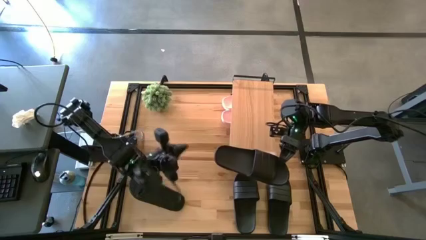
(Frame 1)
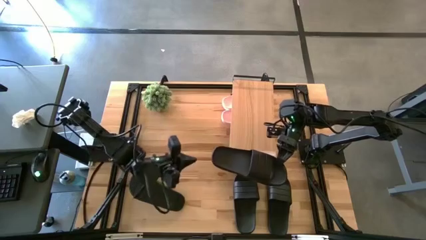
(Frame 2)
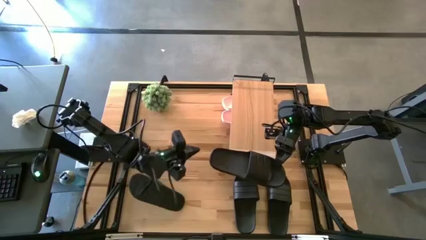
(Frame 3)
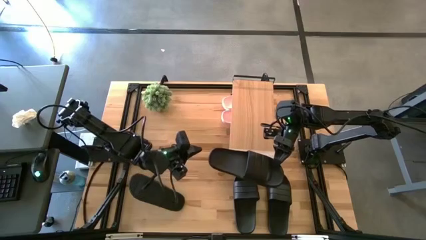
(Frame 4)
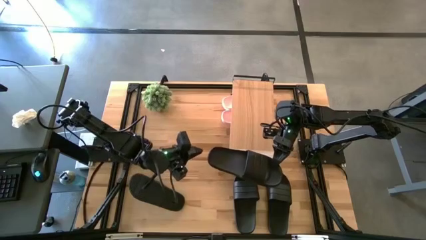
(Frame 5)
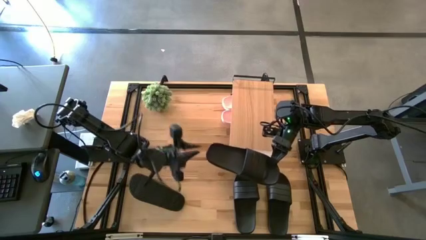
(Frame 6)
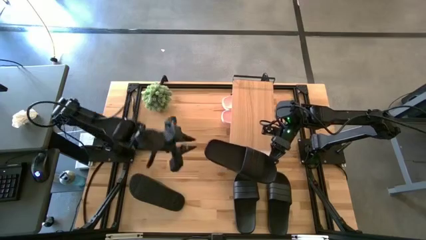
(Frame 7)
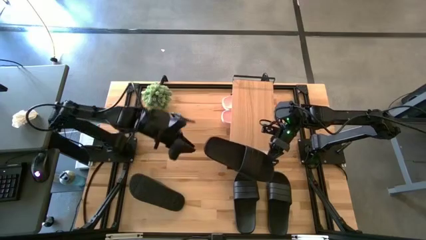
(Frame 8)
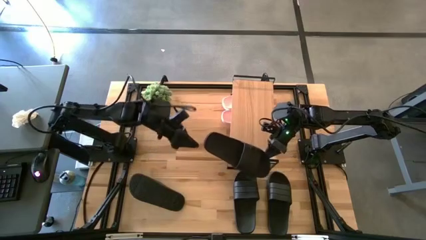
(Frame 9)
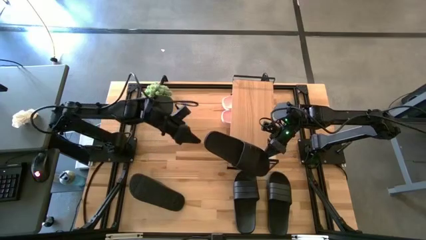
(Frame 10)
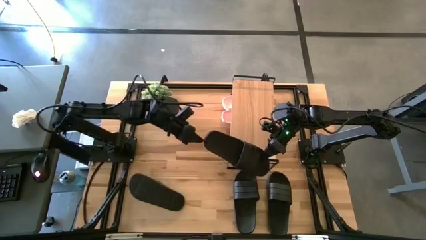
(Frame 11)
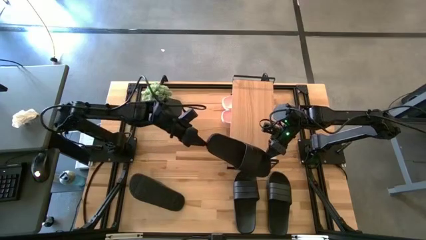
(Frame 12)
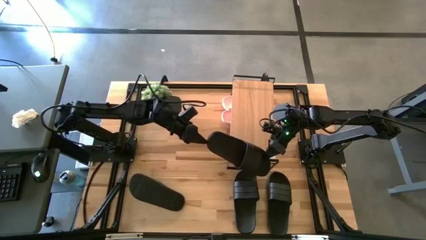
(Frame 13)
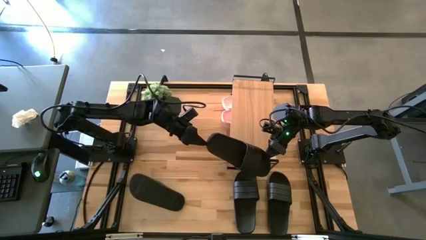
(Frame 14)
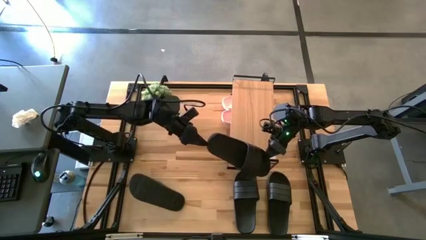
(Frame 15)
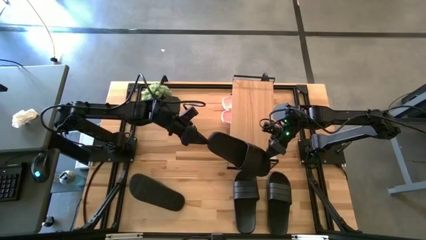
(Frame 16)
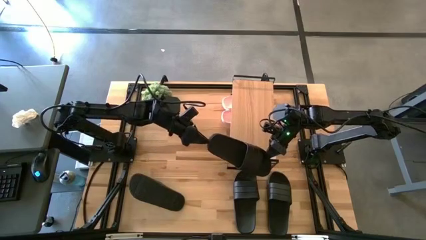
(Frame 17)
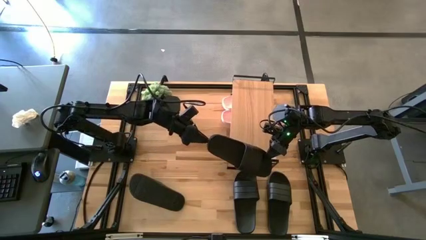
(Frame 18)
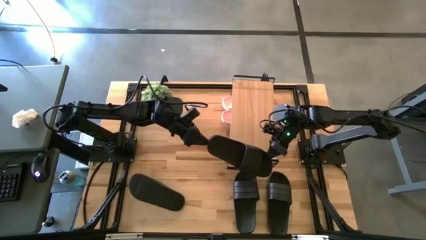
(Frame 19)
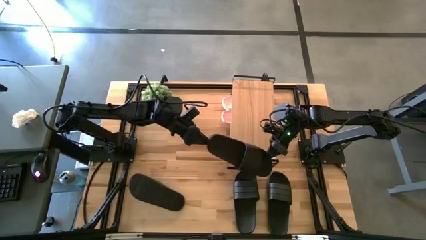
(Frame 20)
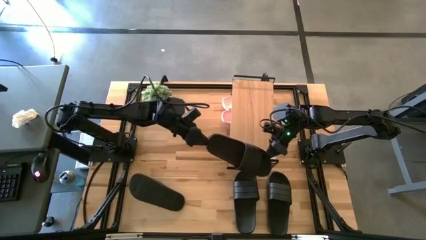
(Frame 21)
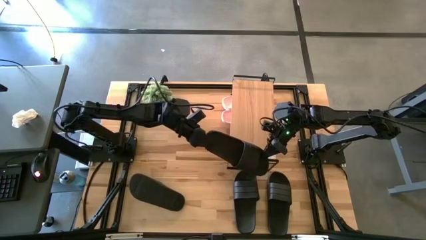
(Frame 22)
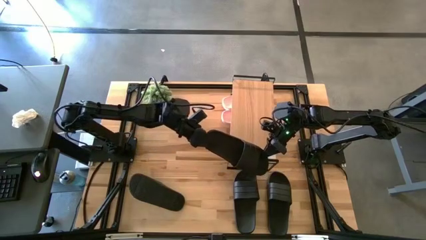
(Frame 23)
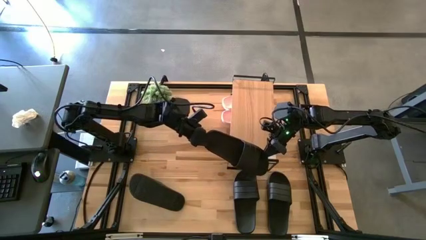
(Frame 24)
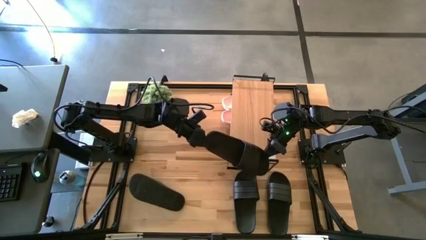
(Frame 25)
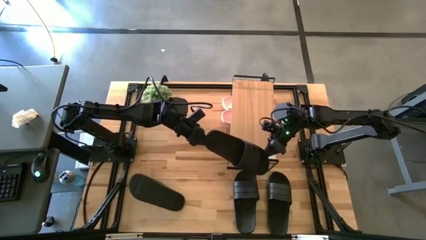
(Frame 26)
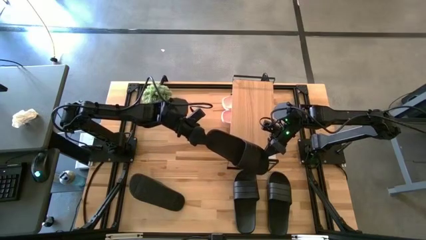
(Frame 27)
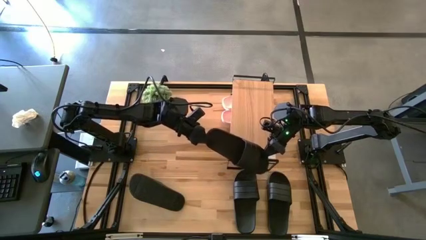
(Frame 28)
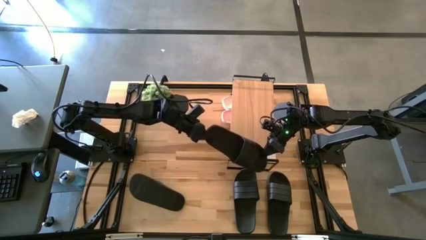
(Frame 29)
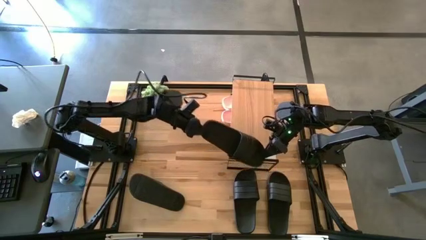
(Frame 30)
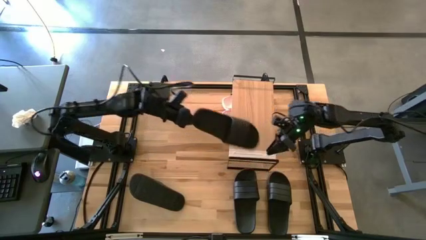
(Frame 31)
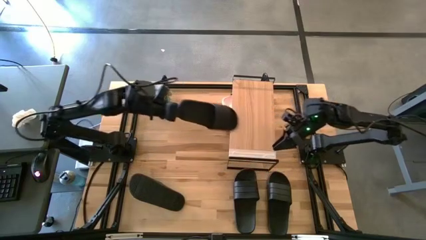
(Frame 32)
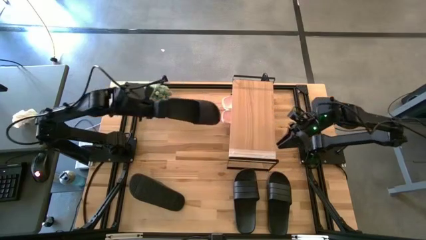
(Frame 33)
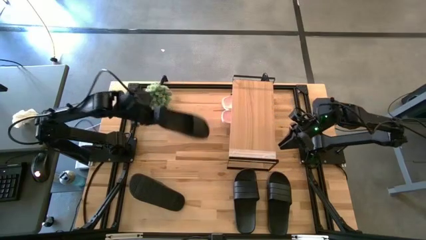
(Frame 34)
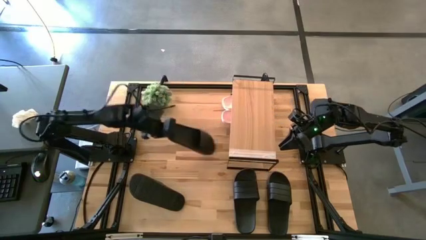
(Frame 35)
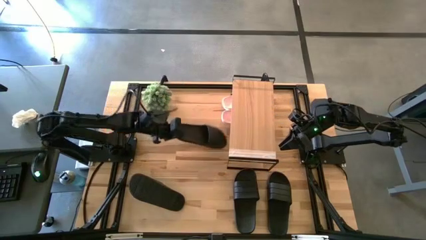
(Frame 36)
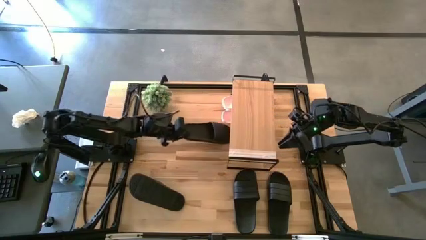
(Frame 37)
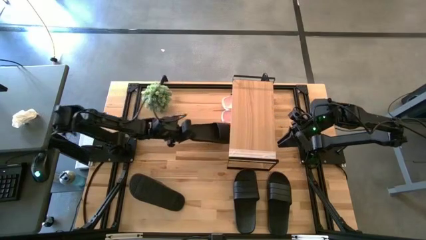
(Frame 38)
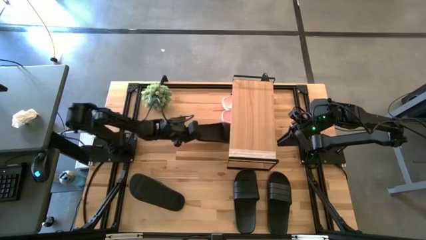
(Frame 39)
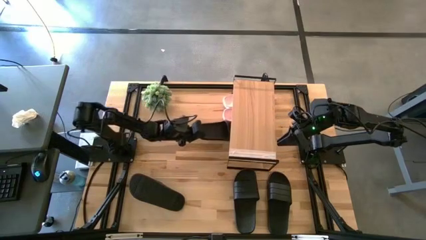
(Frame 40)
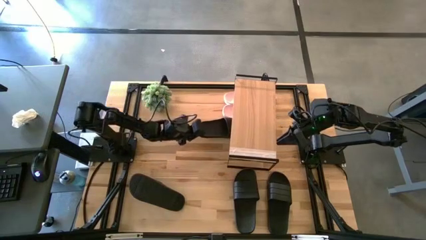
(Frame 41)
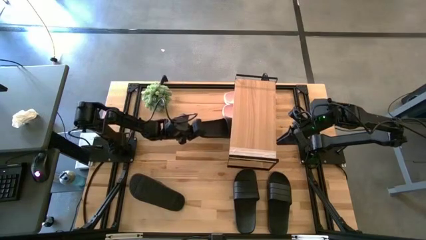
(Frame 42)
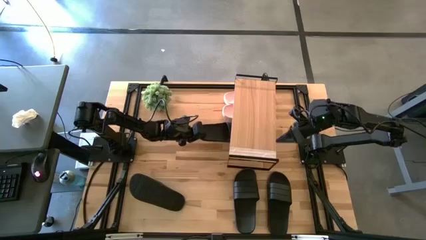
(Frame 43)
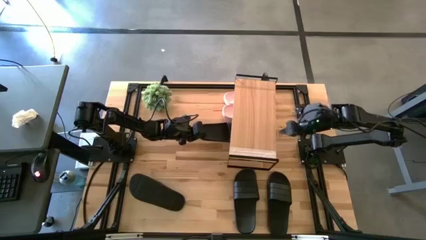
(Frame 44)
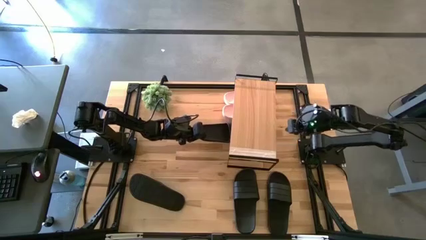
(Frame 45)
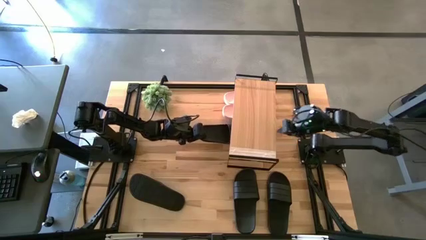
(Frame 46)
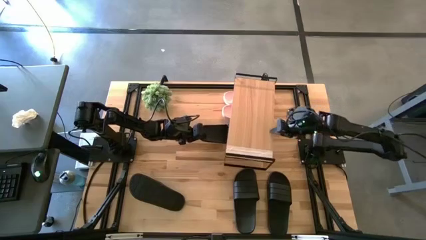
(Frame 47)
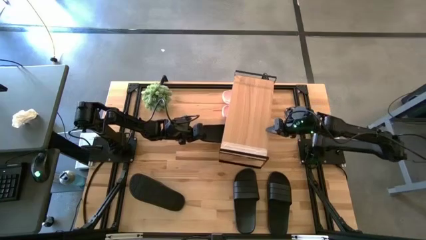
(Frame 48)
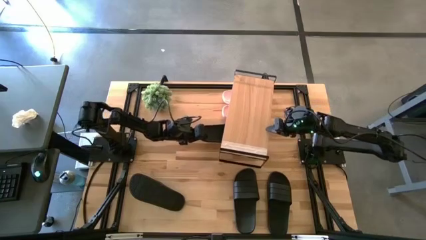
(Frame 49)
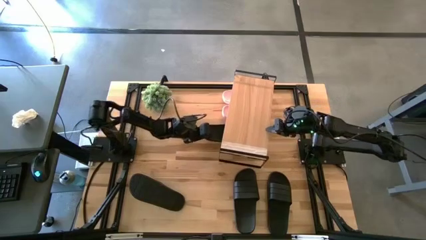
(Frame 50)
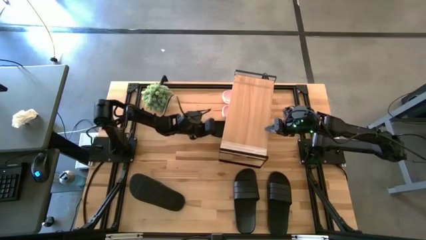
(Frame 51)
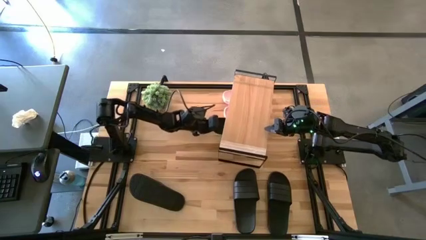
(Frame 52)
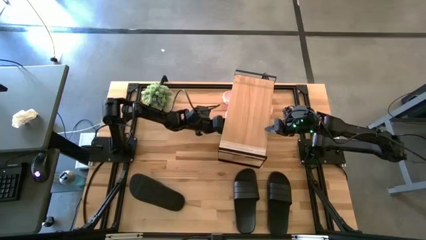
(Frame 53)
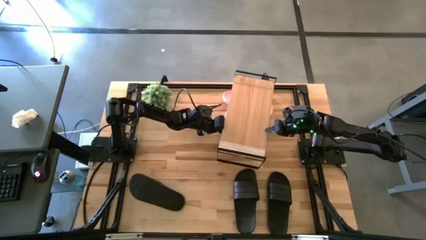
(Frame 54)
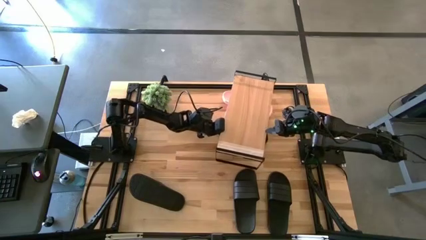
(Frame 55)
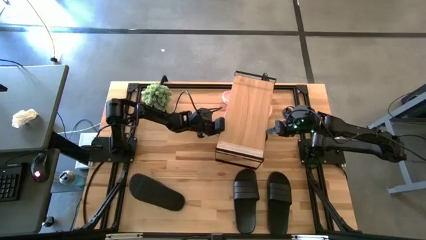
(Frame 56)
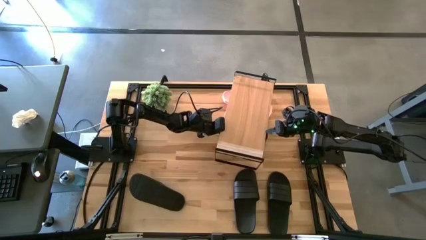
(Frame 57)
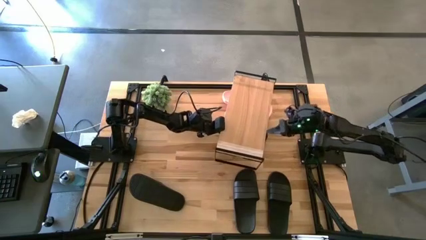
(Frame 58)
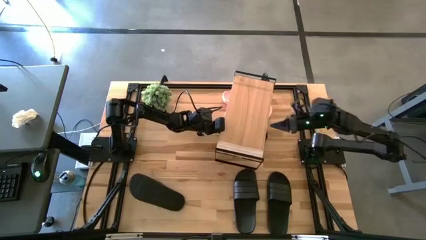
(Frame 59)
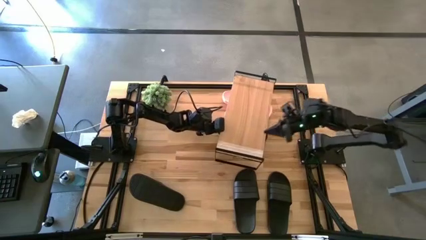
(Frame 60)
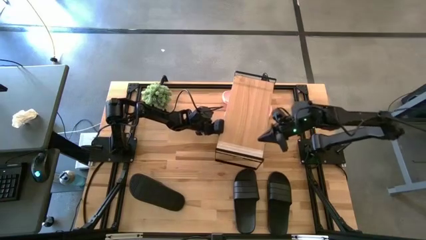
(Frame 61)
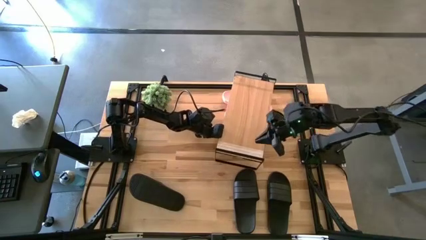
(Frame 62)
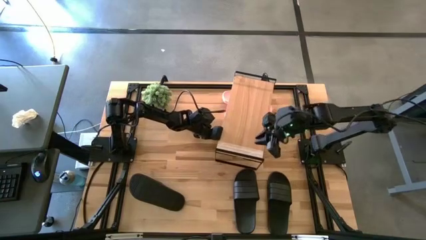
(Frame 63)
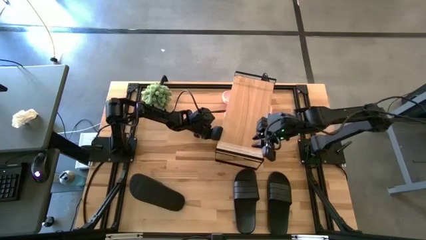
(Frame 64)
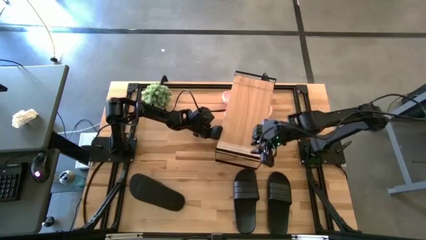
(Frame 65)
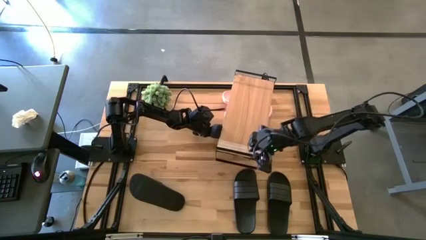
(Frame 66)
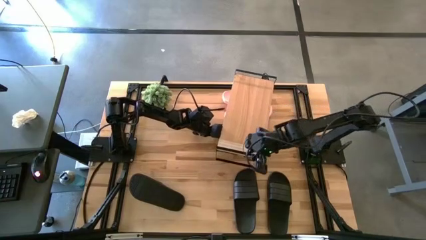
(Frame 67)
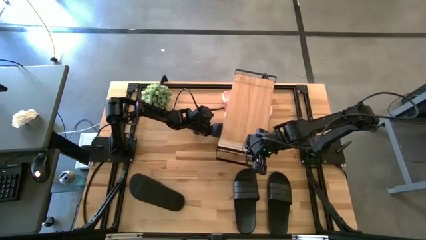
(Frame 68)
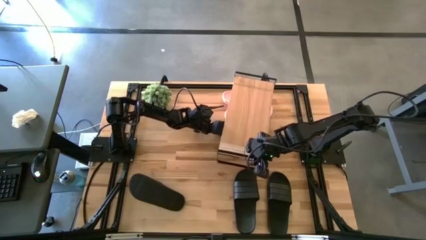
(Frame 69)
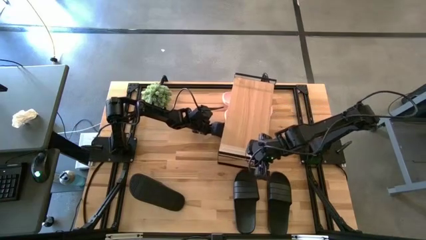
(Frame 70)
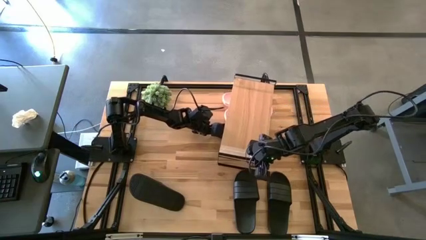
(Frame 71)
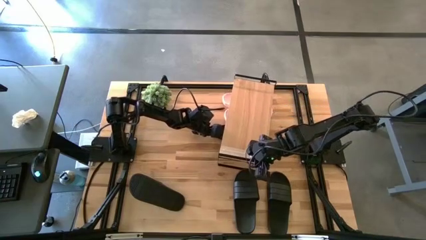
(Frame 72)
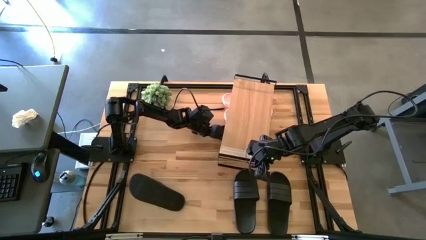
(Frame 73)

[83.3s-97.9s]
Task: Pick and place slides into the shelf
Put the black slipper under the shelf
